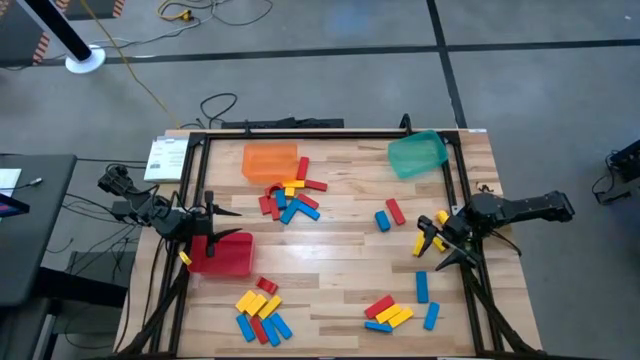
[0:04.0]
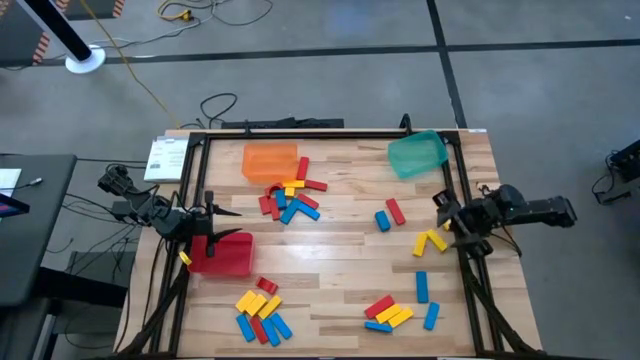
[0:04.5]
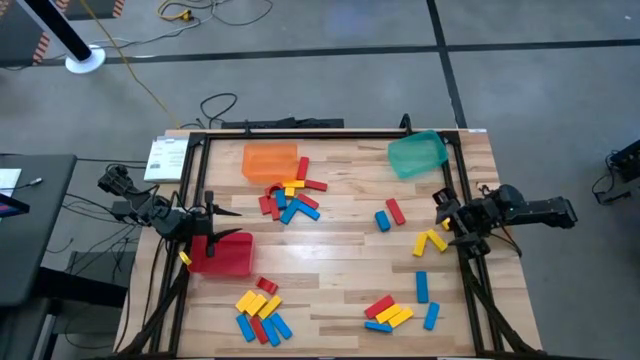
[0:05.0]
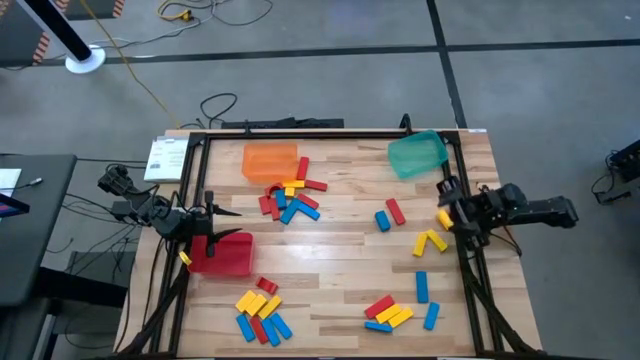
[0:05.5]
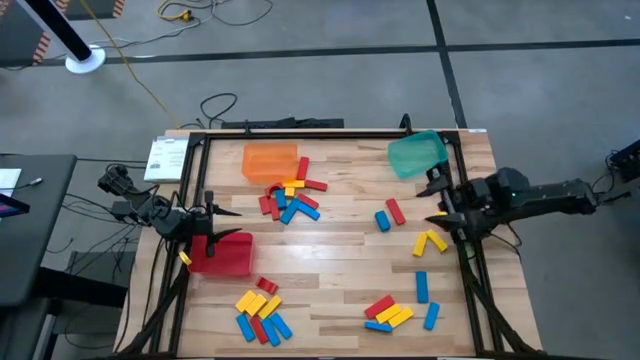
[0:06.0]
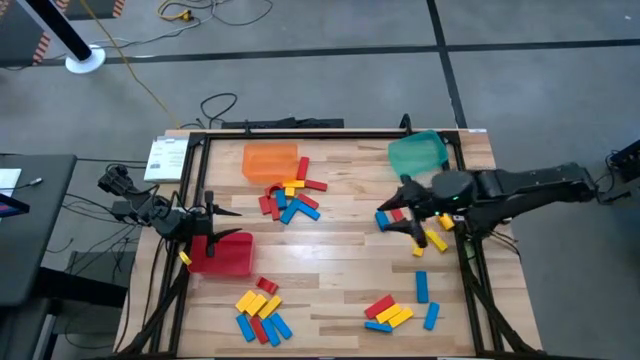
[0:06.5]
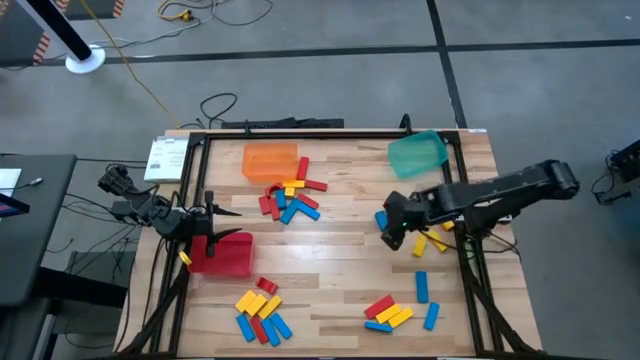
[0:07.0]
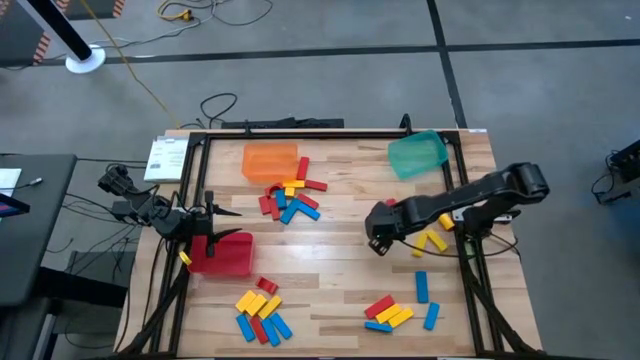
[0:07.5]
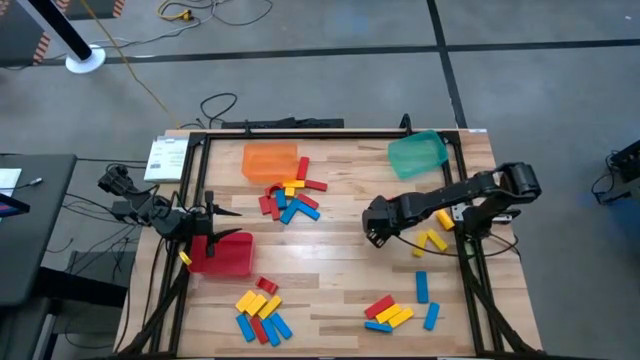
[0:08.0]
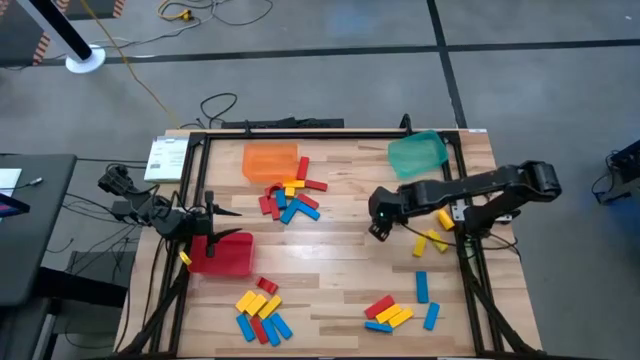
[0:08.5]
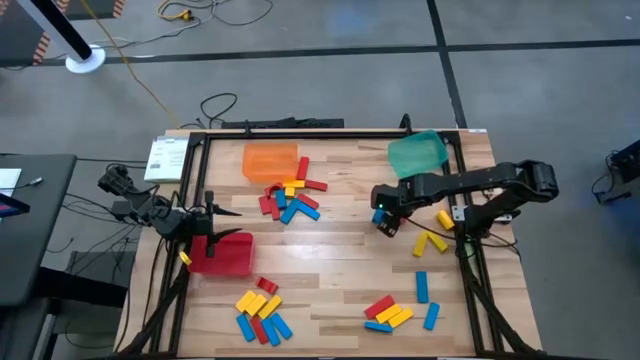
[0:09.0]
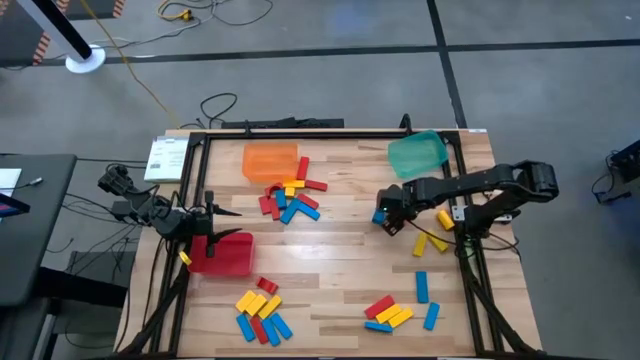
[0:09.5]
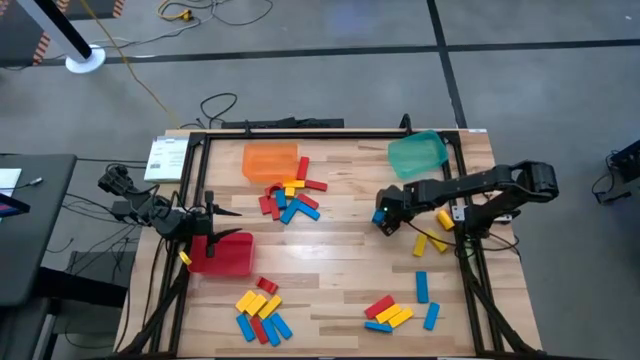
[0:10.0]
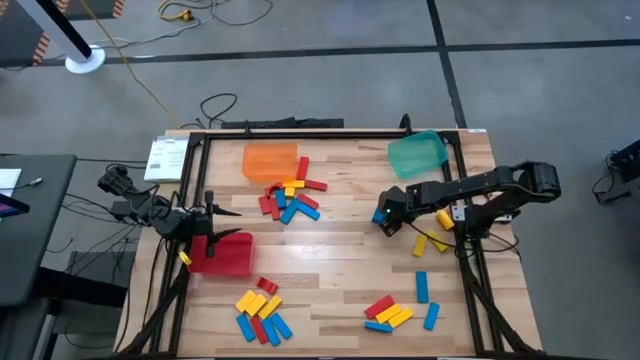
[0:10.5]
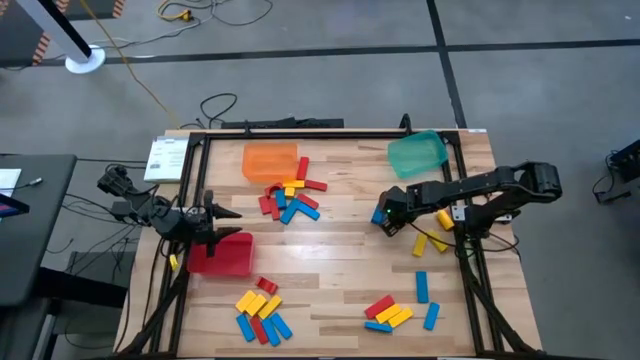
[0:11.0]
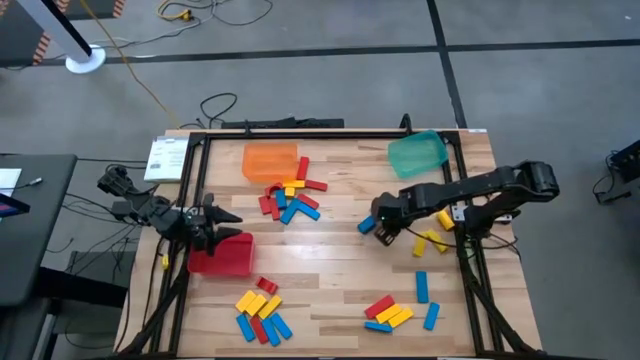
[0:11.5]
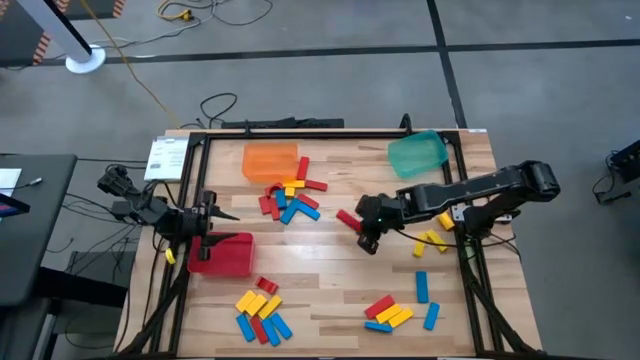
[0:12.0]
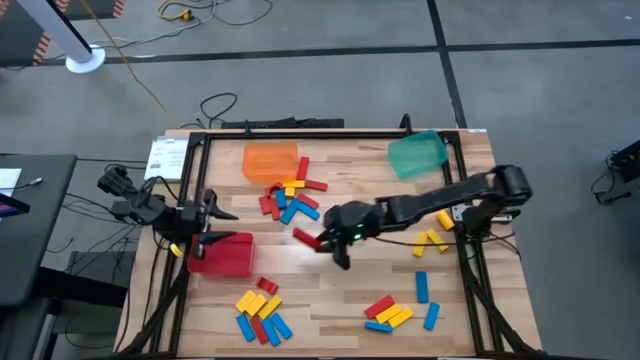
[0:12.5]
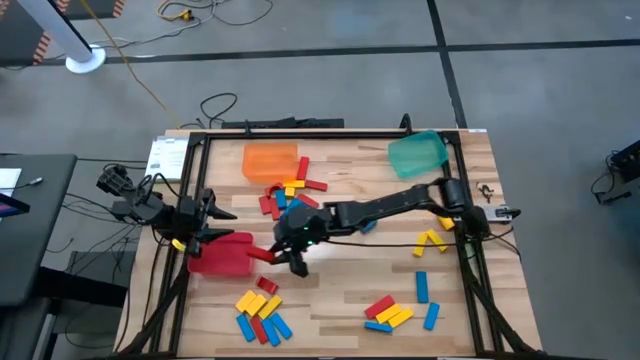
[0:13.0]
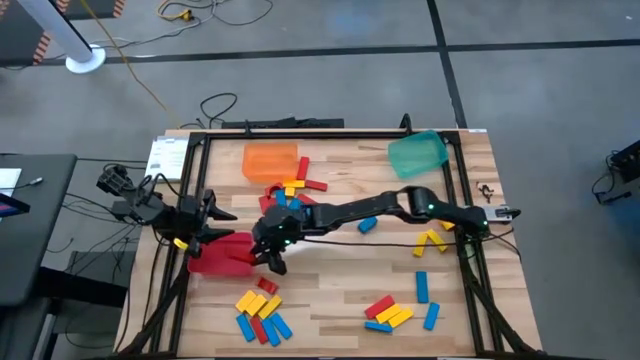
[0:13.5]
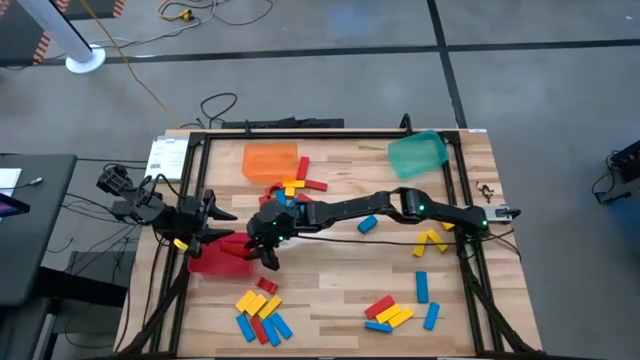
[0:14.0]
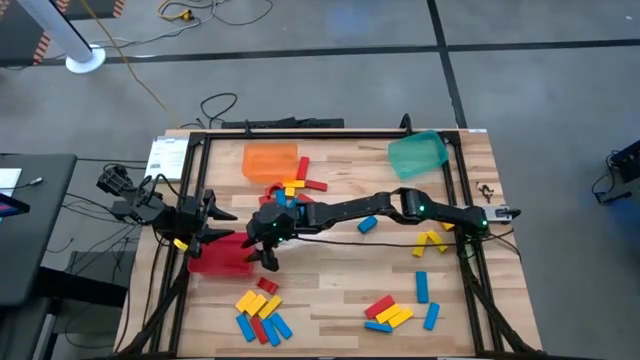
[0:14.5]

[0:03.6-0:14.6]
Task: Sort blocks
Put the red block into the red bin

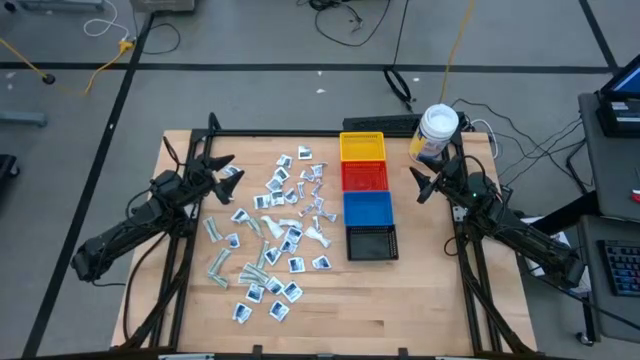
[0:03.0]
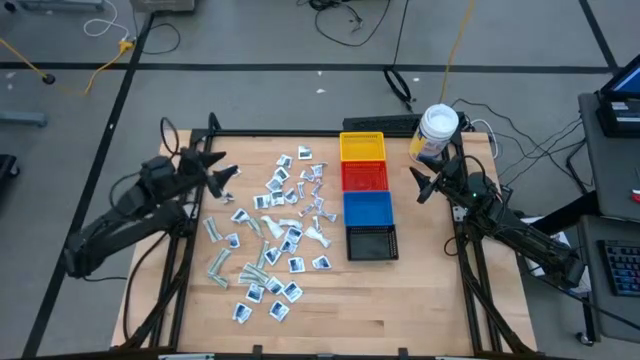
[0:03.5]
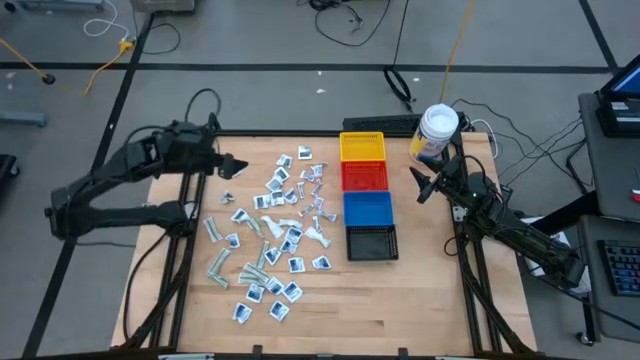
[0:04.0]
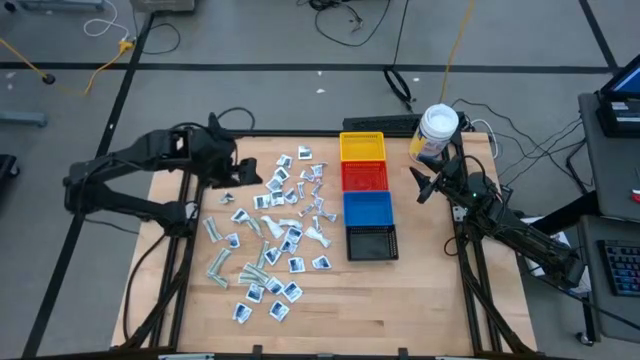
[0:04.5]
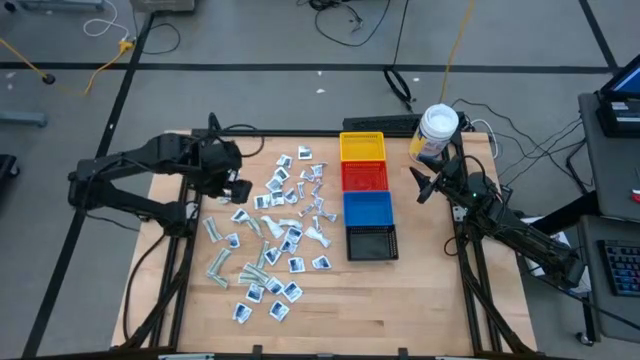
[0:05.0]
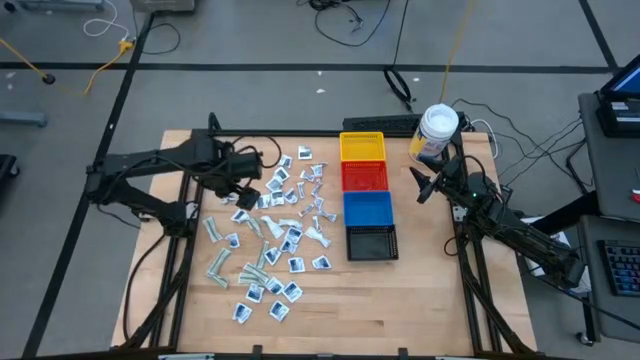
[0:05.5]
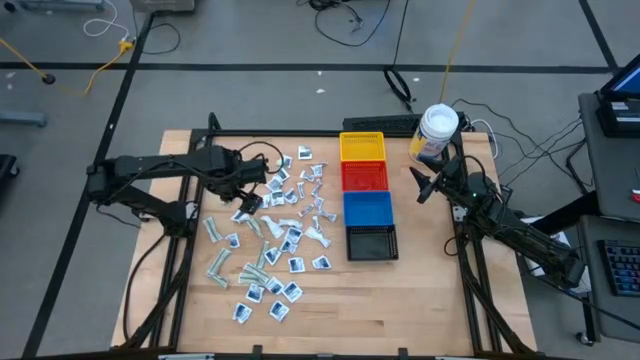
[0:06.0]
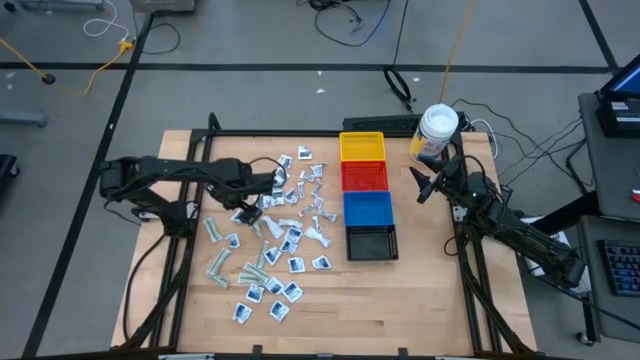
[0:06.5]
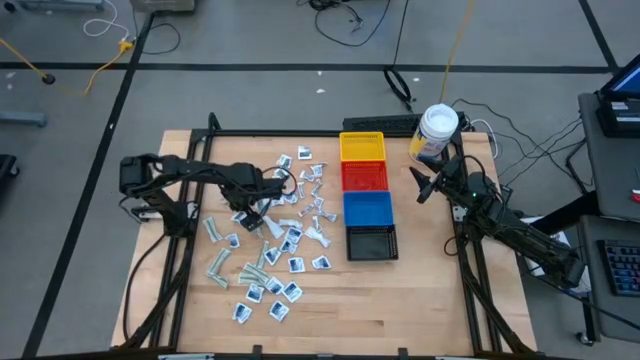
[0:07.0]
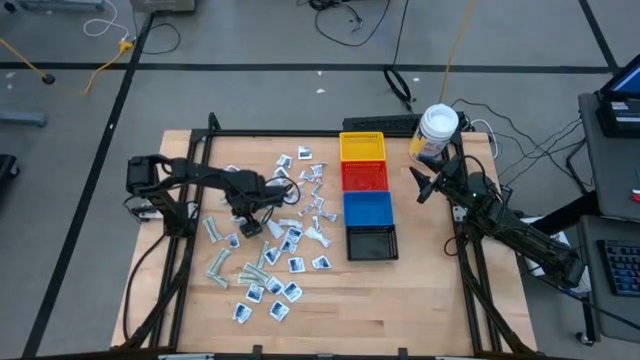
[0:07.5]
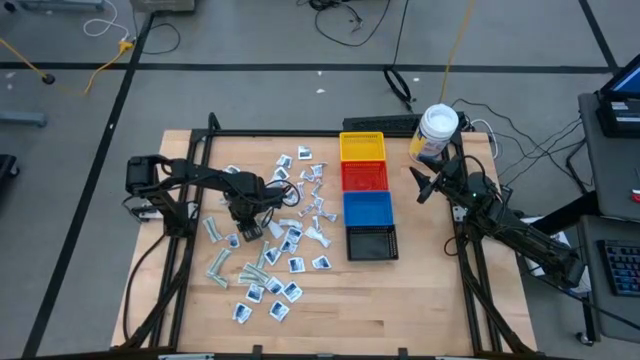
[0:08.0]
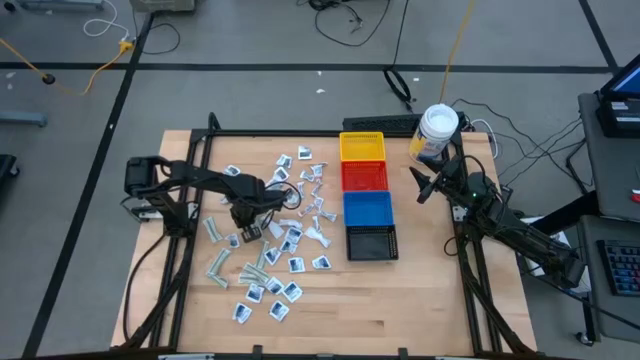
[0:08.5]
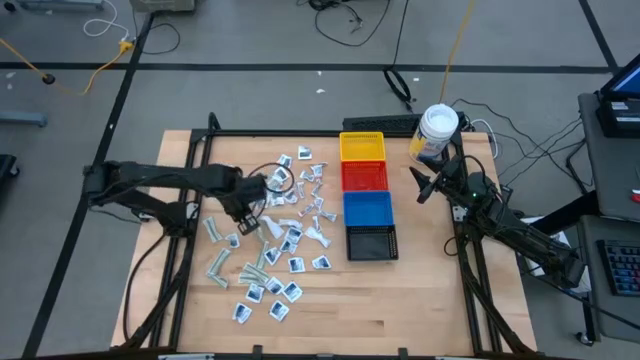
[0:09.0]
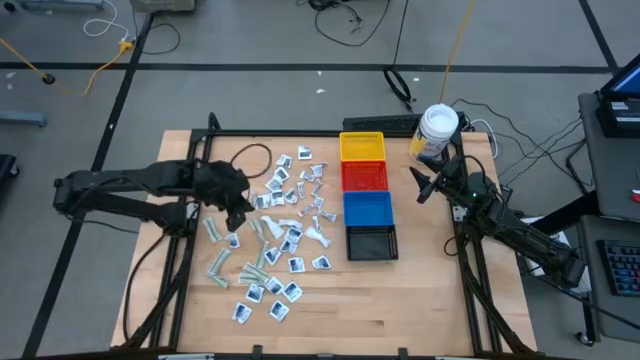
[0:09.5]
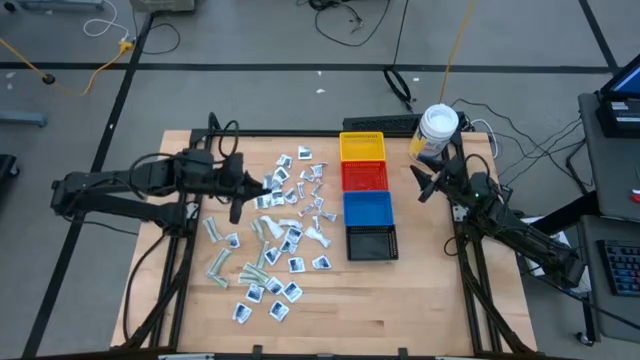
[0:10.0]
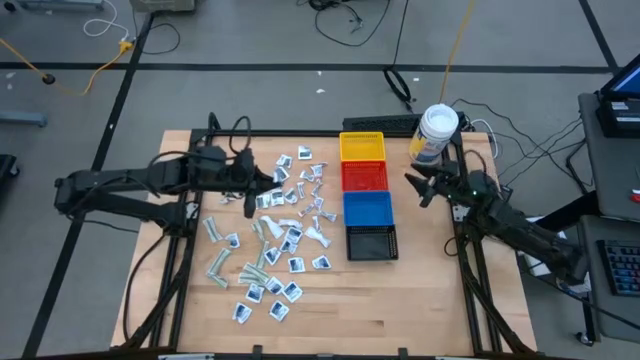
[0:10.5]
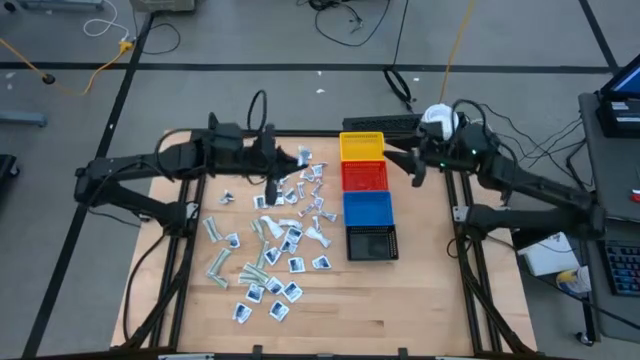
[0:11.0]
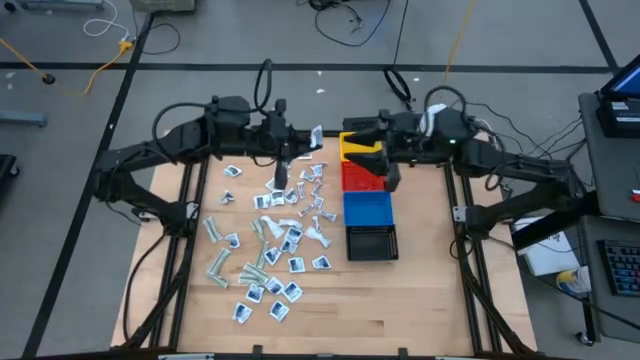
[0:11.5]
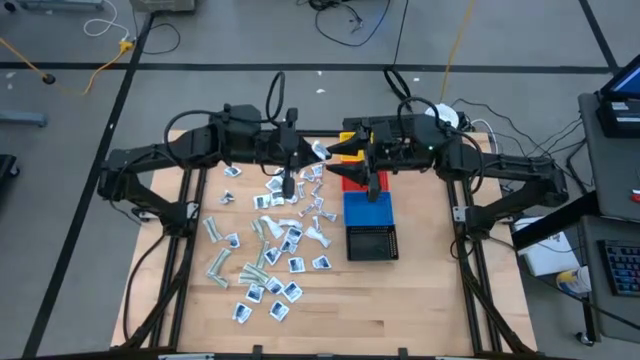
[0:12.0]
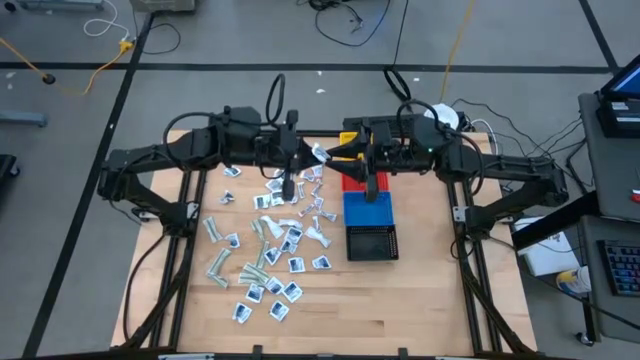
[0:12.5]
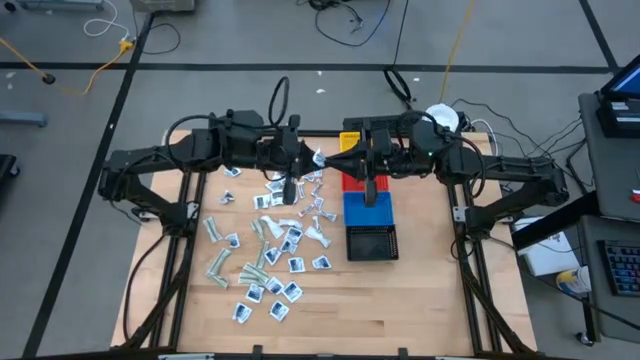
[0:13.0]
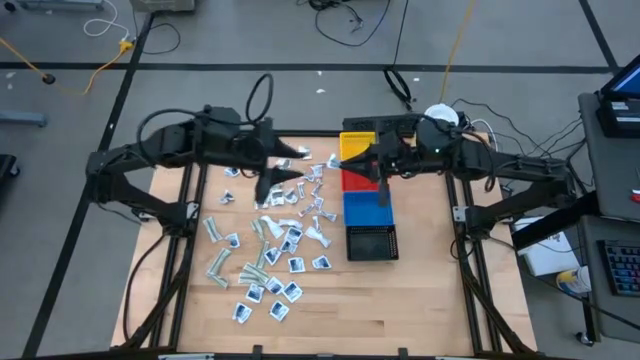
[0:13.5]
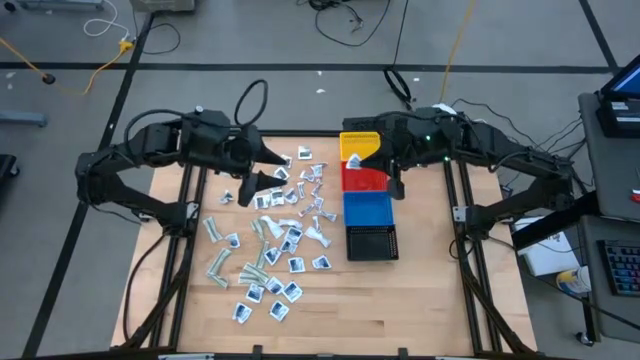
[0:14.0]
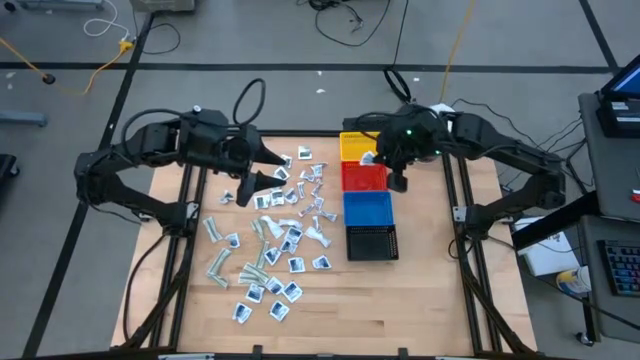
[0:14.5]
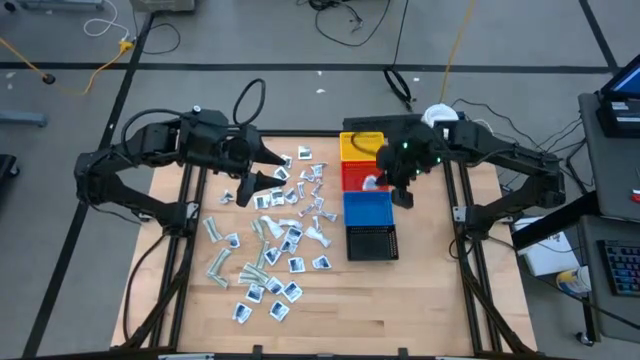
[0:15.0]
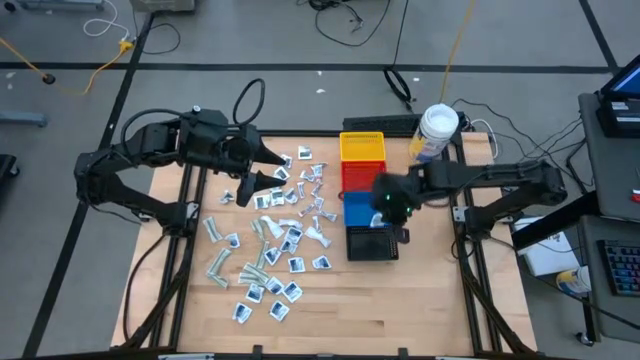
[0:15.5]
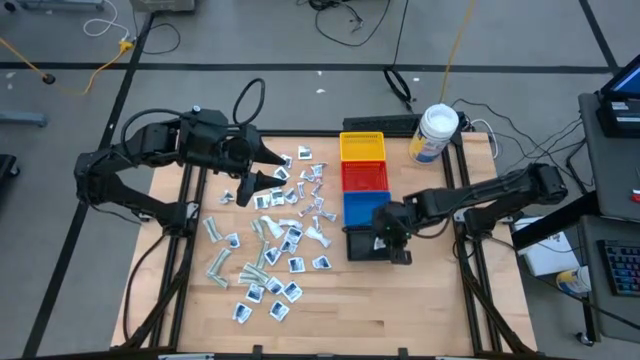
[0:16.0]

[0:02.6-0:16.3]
Task: Pick & Place First Aid Supplies
Put the black towelette pack into the black bin
